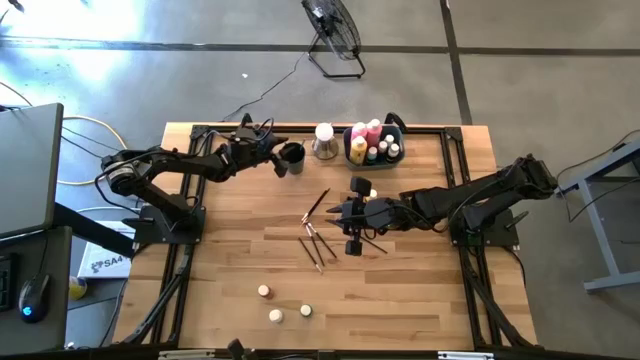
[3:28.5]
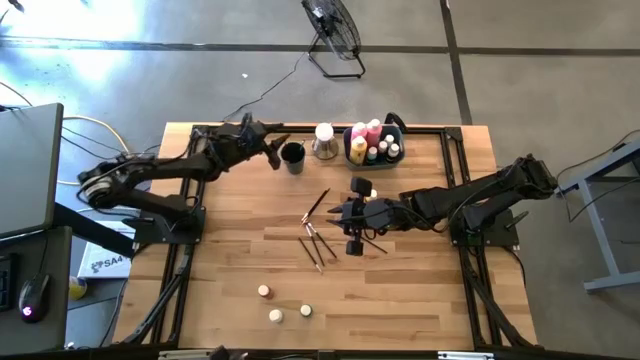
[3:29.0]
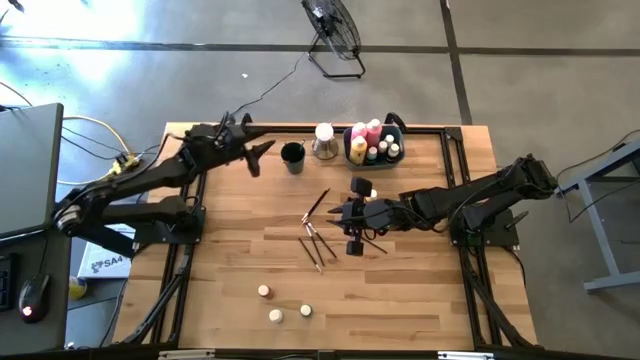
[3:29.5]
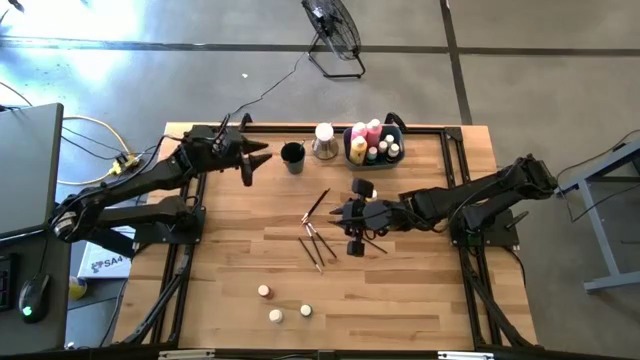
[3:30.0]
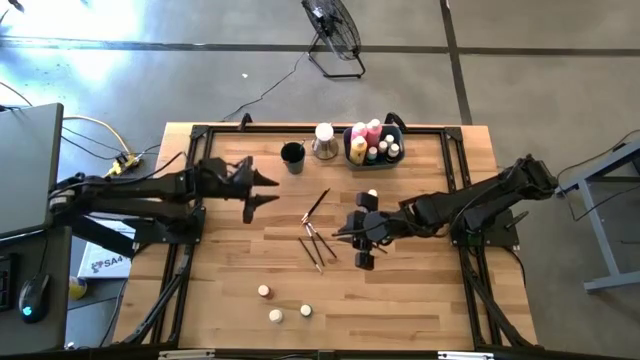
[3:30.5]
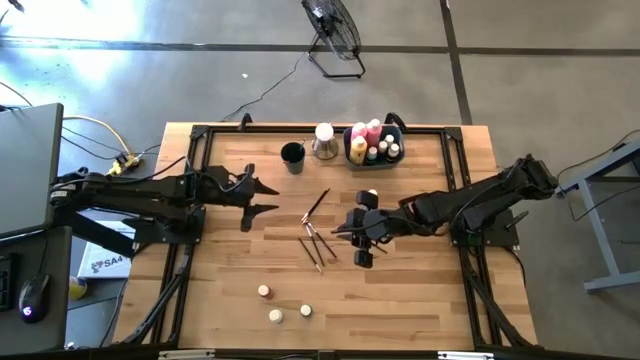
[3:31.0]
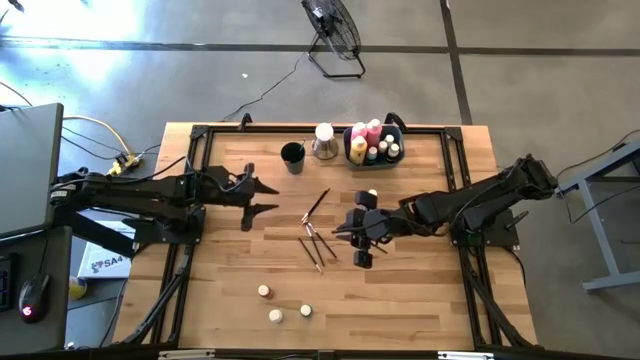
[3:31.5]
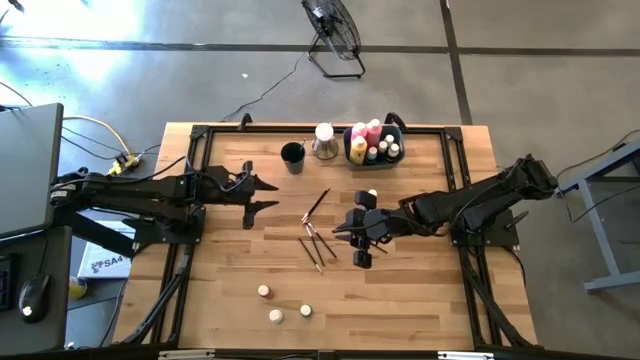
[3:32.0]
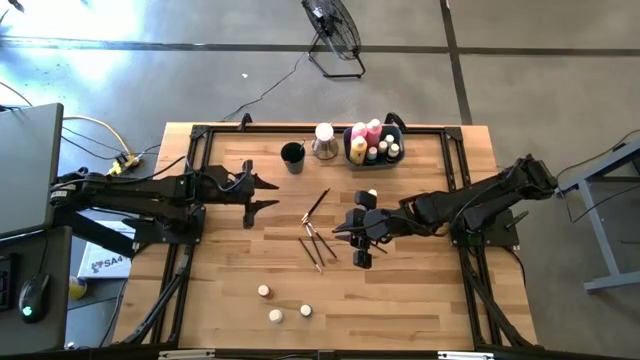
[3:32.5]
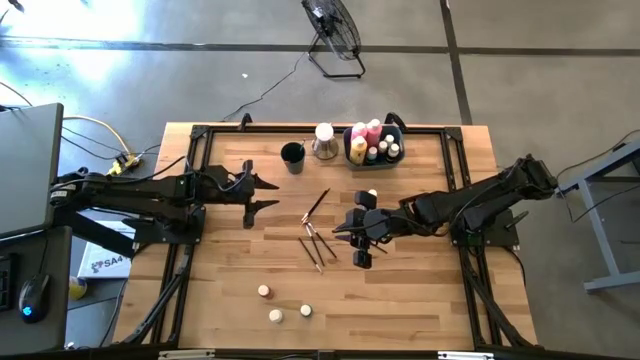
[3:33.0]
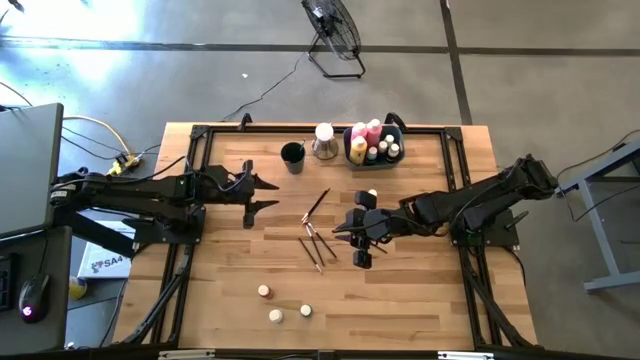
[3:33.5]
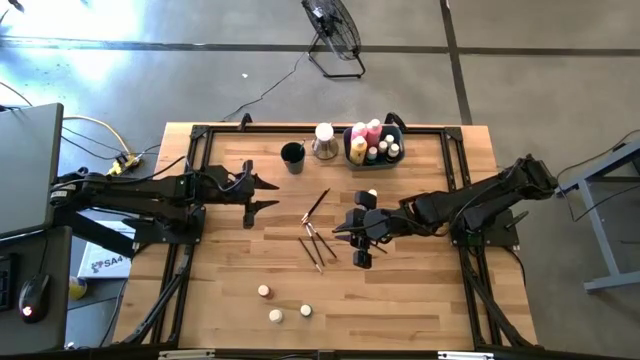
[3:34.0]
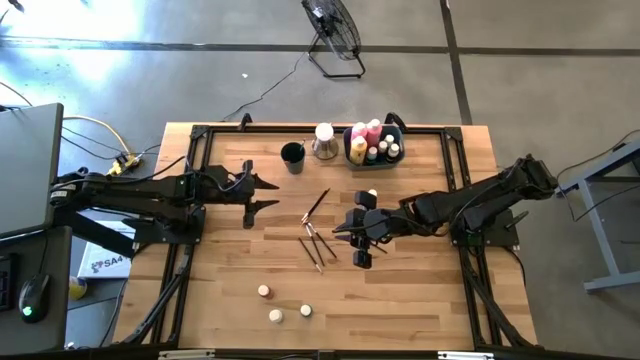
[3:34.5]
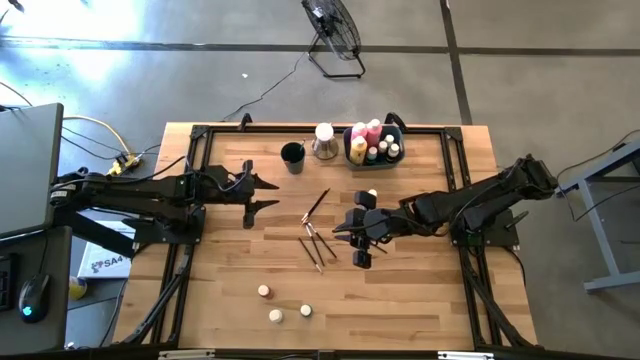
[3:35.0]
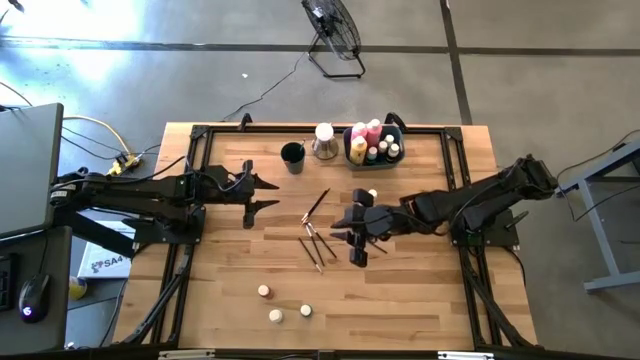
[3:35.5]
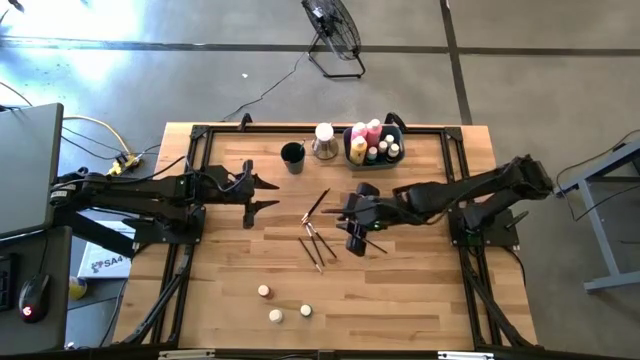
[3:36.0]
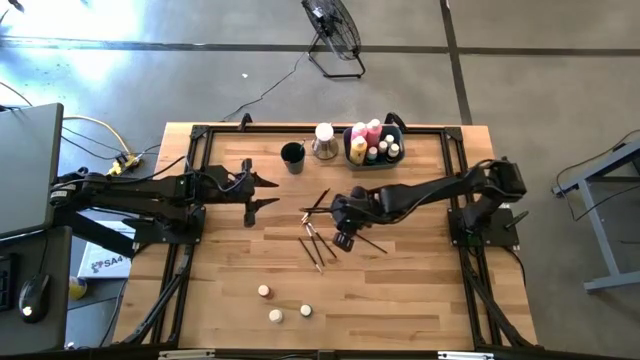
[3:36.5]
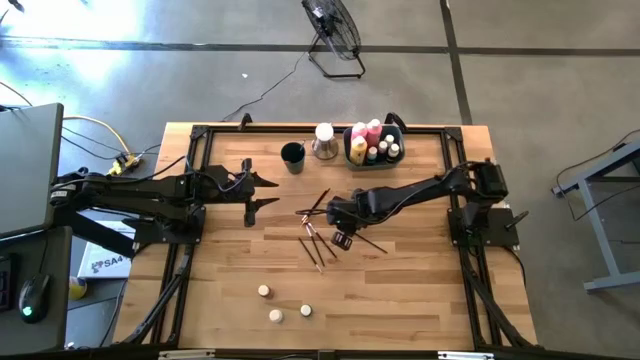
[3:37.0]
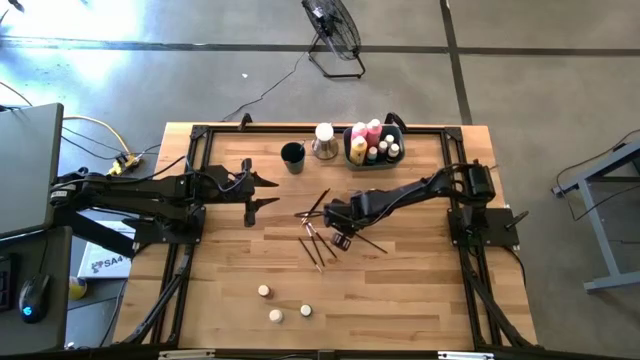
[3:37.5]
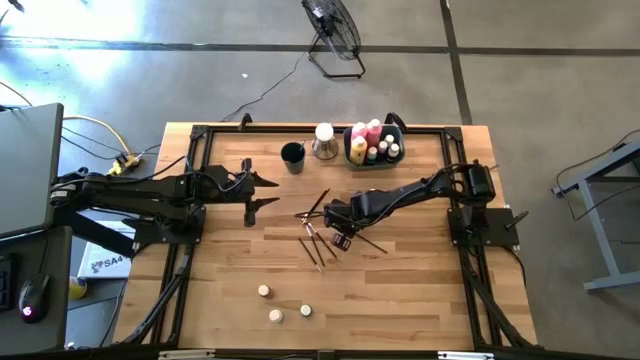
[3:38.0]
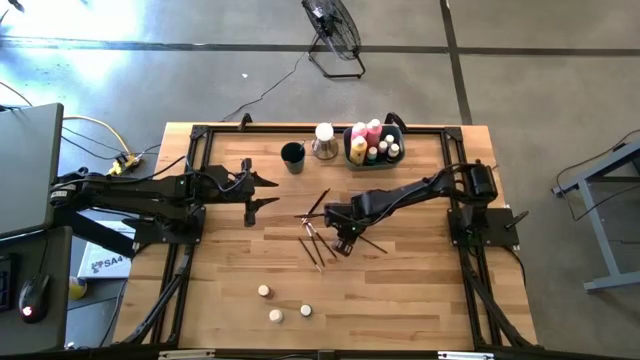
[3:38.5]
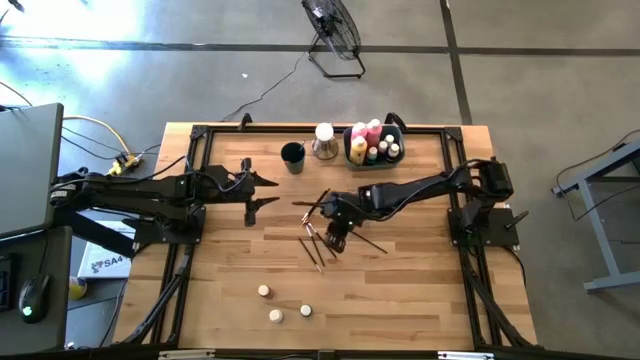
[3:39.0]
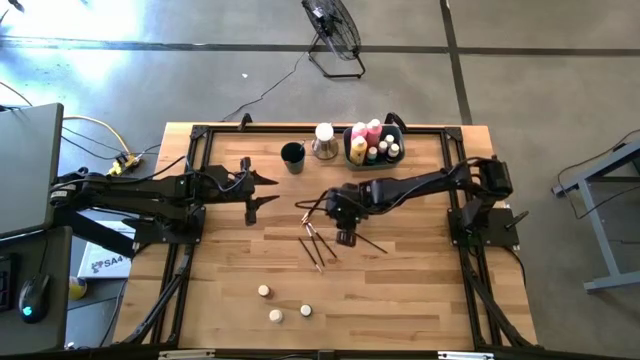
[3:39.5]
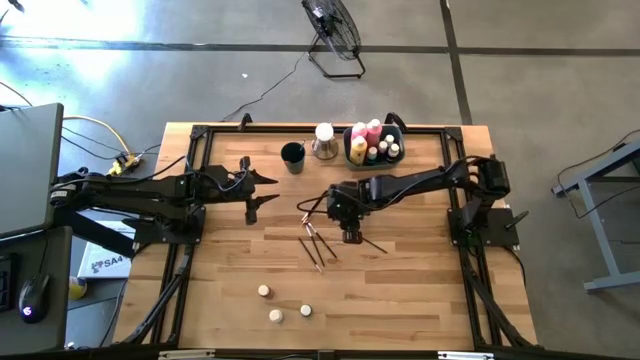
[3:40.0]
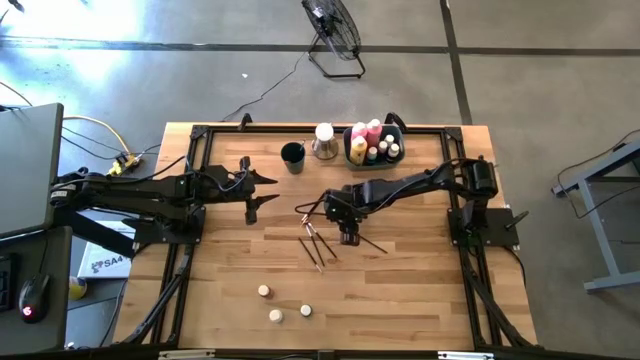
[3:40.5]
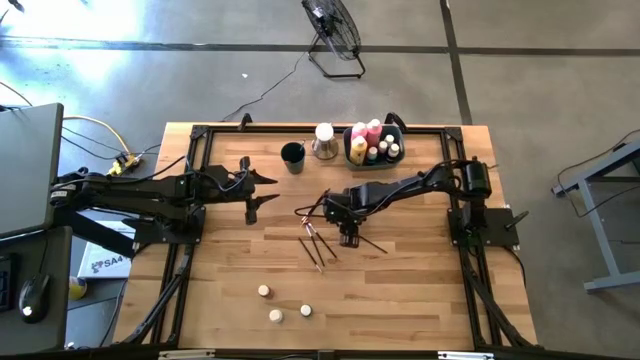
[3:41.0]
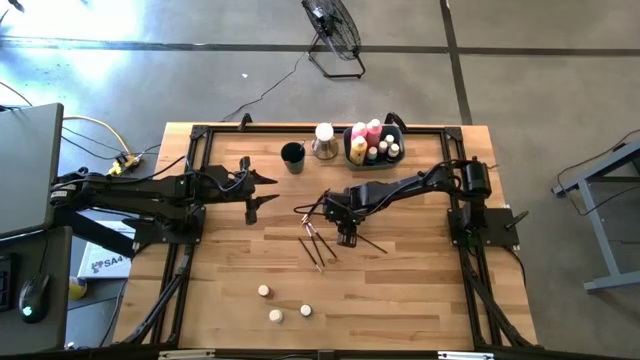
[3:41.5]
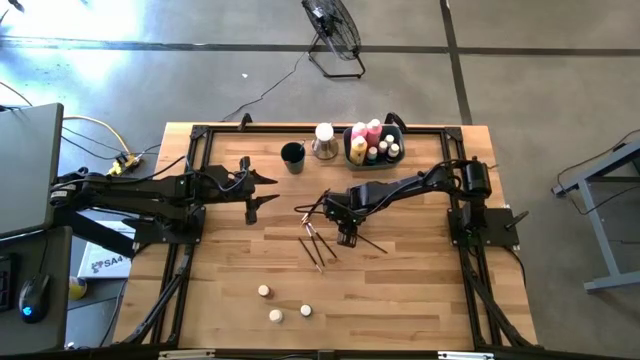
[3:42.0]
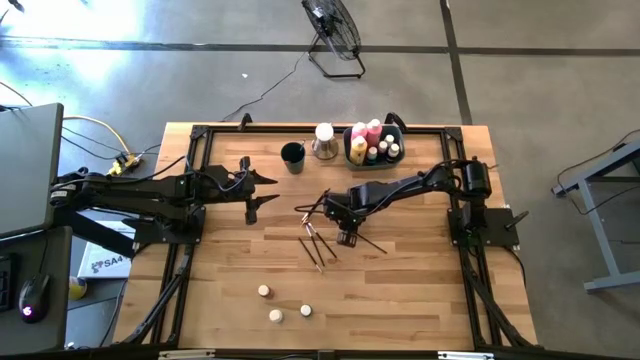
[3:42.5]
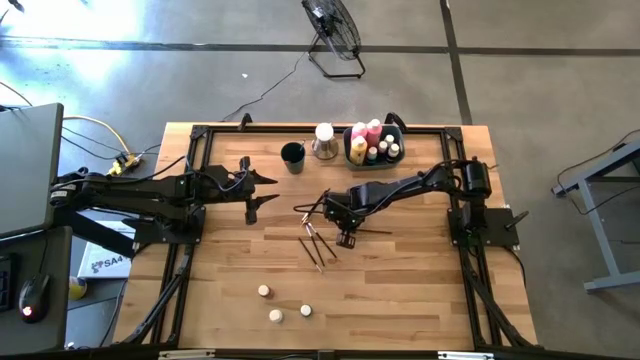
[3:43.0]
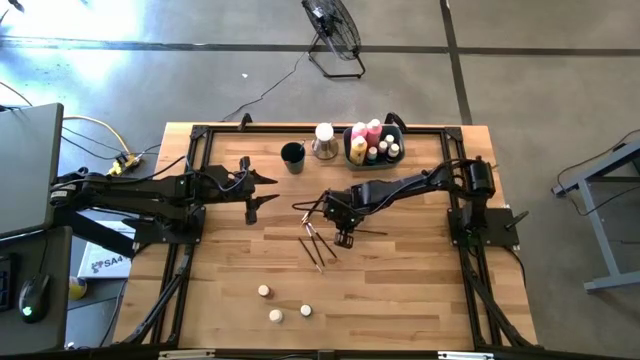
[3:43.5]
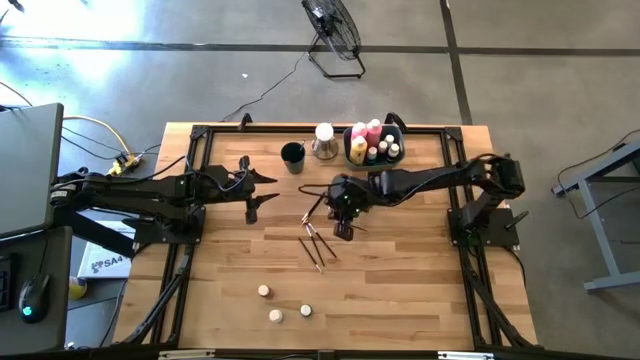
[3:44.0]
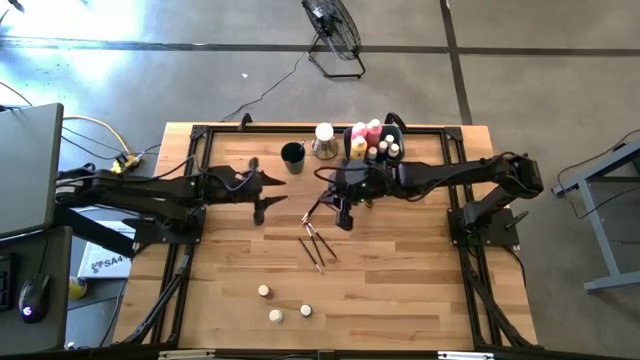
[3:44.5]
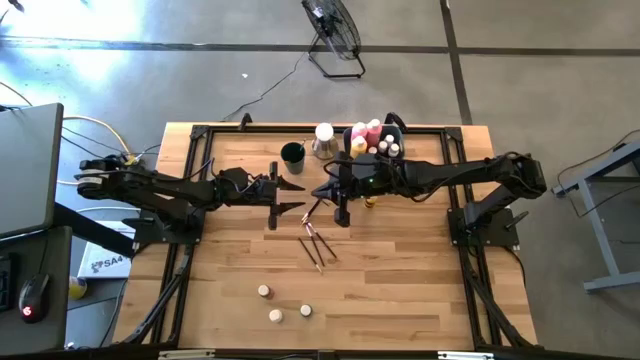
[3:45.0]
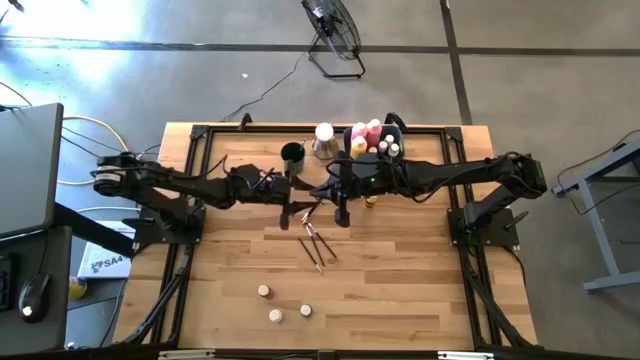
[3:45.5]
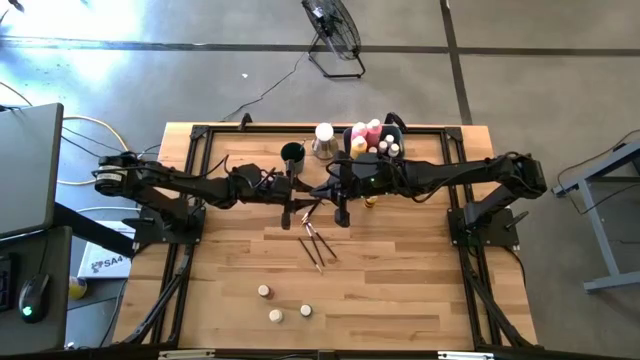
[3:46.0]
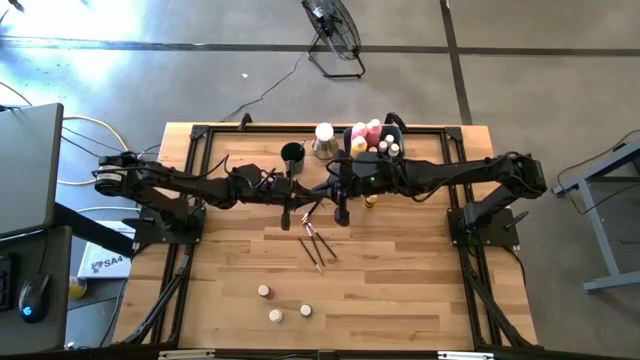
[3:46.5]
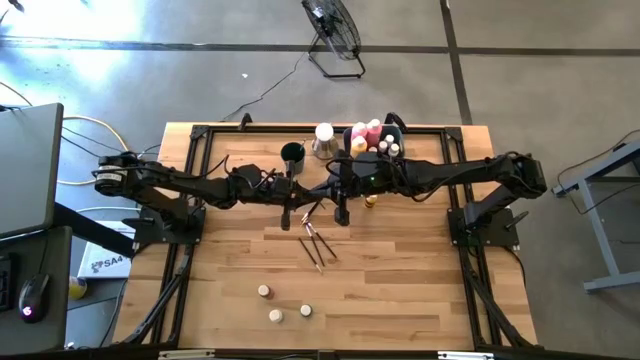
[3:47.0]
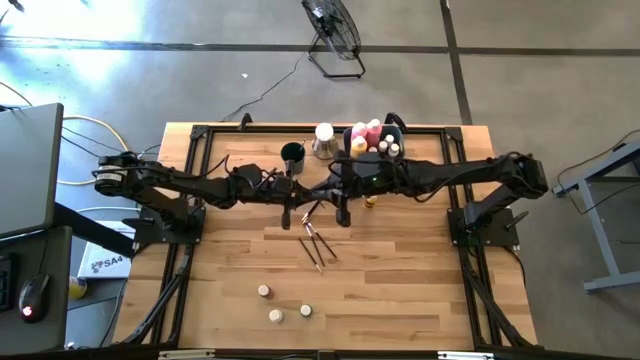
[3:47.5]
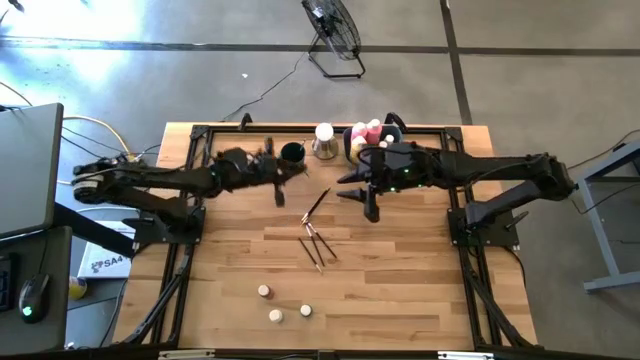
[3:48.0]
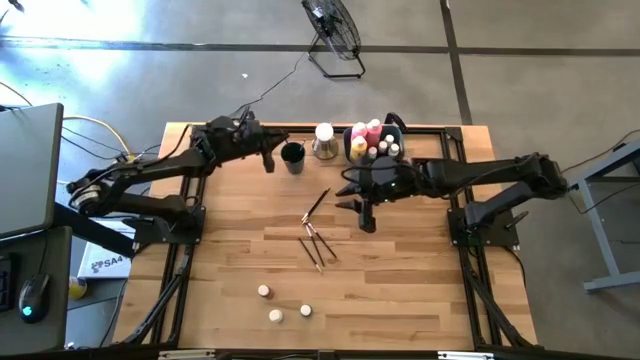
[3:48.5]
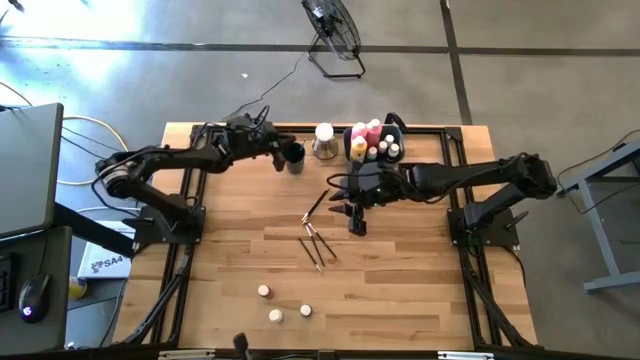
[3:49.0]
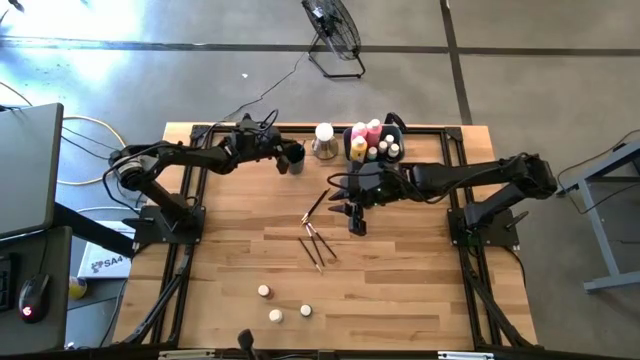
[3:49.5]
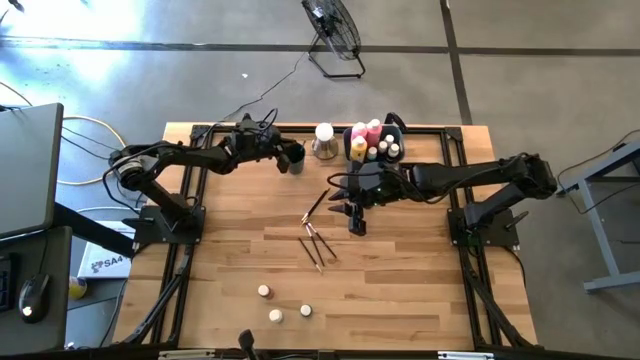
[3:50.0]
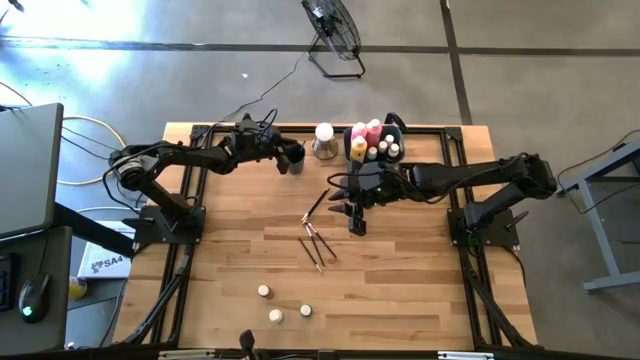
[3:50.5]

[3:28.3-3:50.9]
Task: Pick & Place Paint Supplies
Put the gold paintbrush into the blue cup
